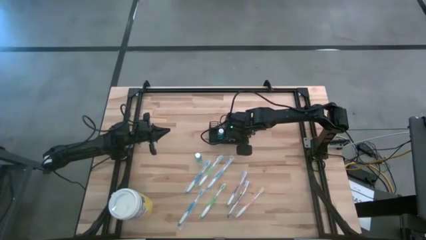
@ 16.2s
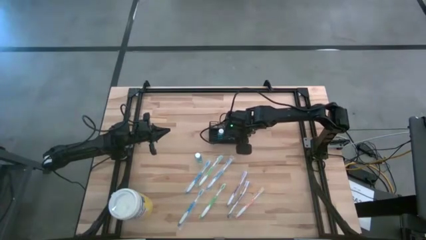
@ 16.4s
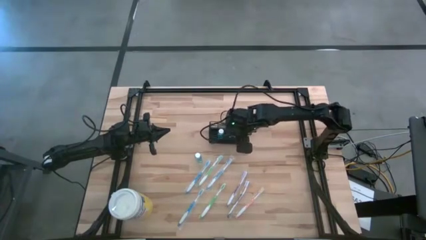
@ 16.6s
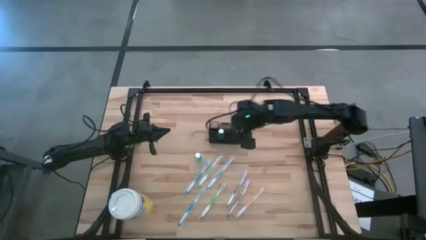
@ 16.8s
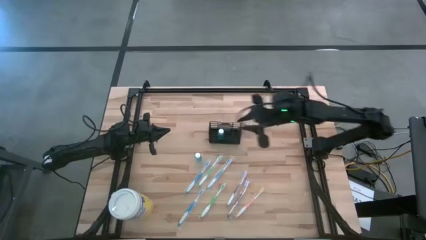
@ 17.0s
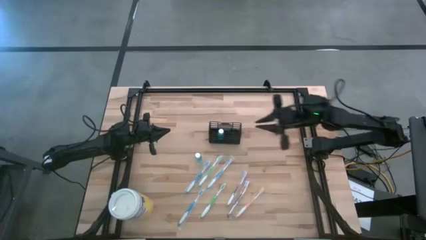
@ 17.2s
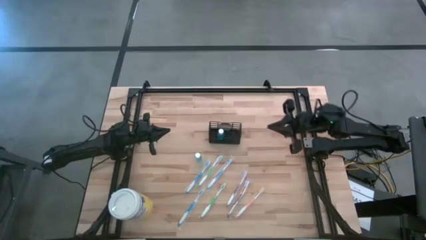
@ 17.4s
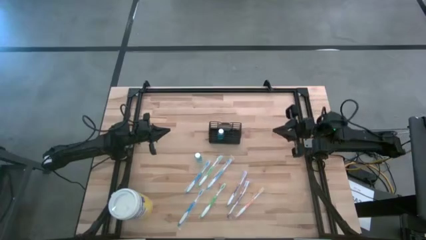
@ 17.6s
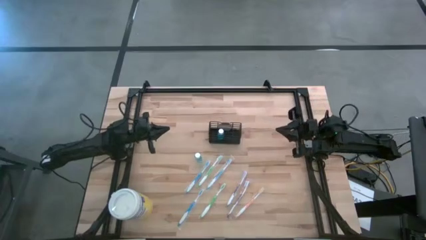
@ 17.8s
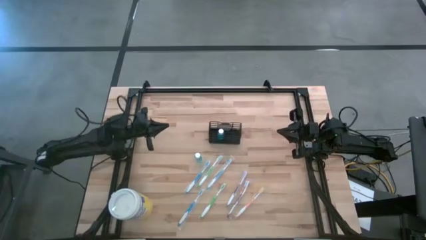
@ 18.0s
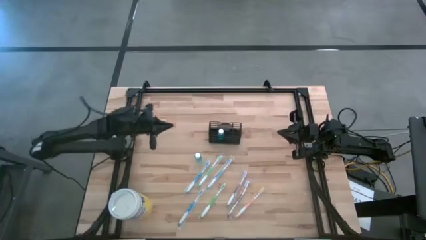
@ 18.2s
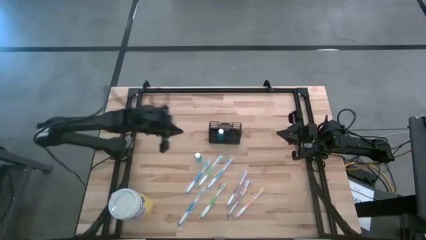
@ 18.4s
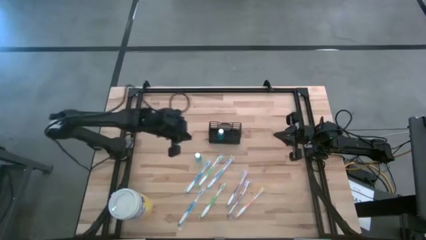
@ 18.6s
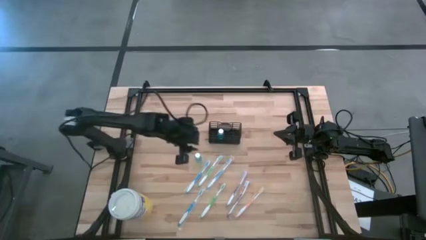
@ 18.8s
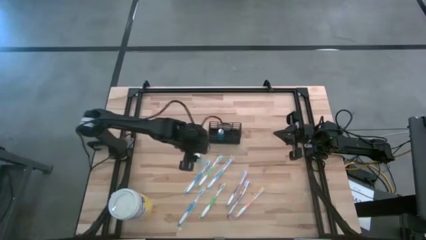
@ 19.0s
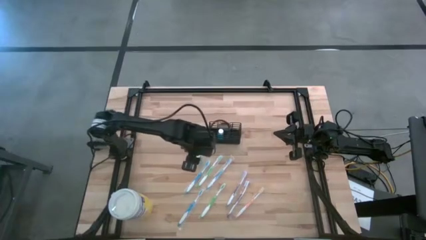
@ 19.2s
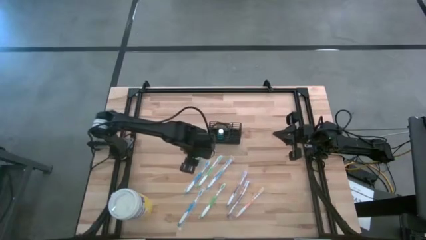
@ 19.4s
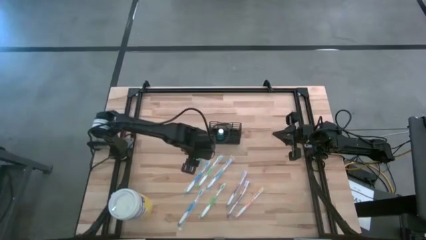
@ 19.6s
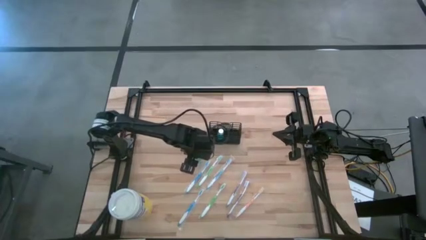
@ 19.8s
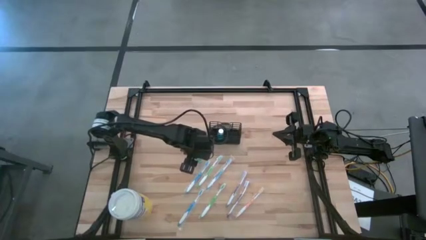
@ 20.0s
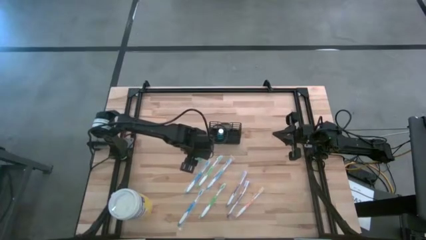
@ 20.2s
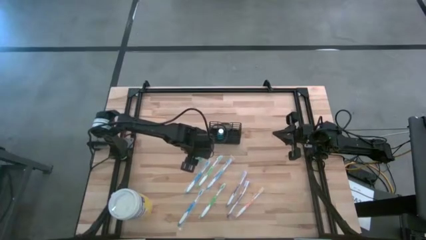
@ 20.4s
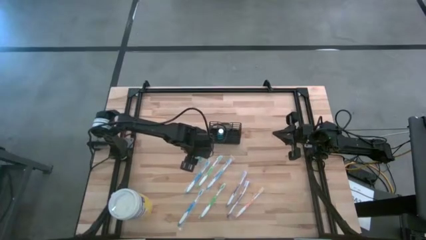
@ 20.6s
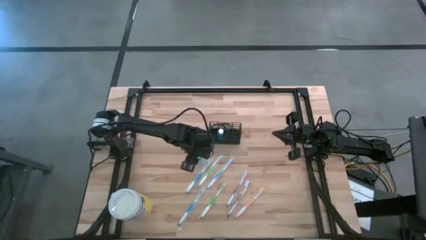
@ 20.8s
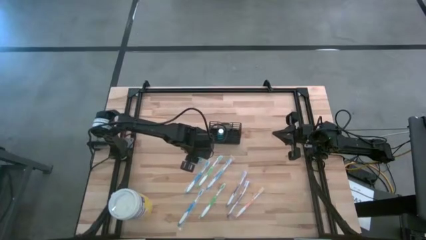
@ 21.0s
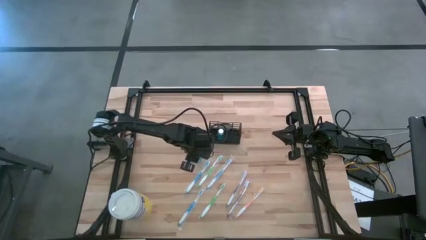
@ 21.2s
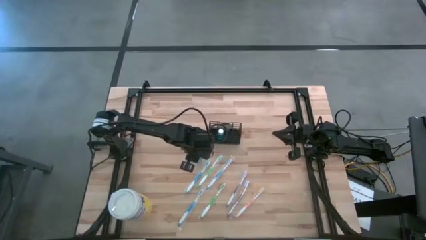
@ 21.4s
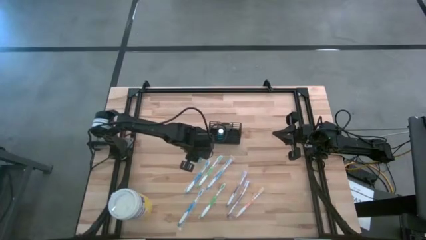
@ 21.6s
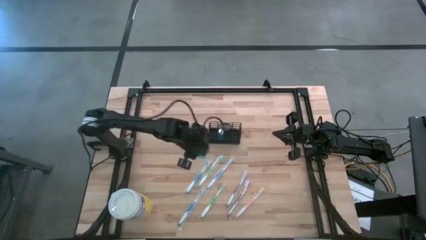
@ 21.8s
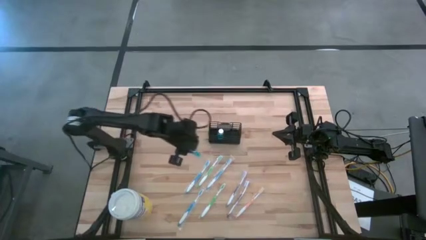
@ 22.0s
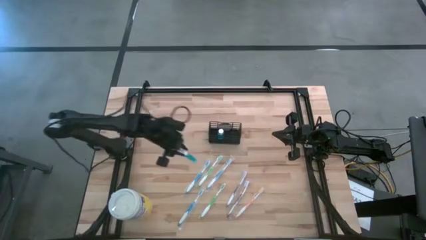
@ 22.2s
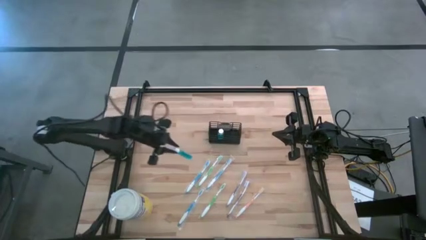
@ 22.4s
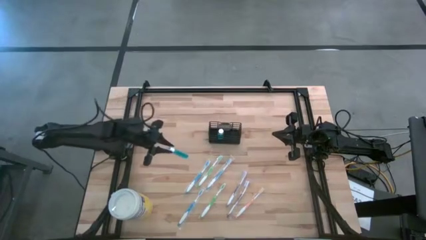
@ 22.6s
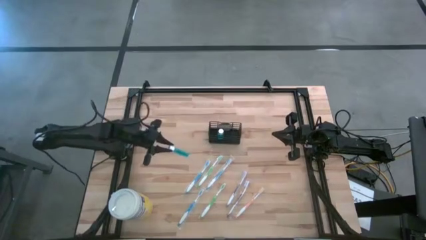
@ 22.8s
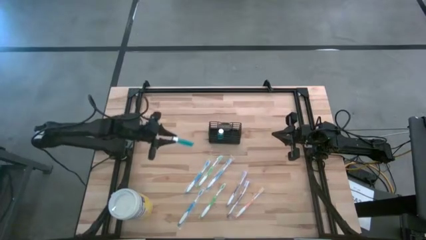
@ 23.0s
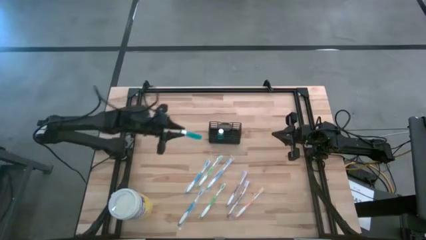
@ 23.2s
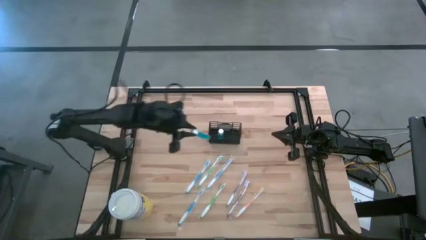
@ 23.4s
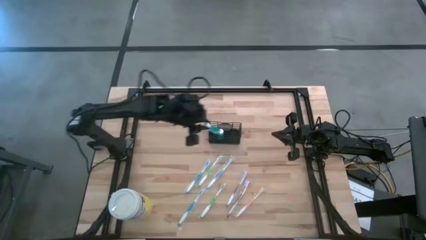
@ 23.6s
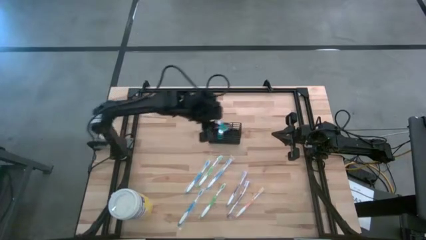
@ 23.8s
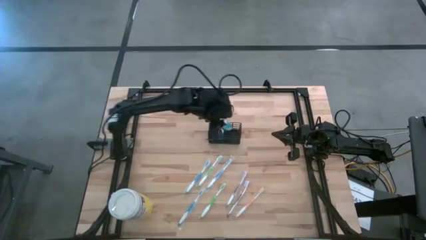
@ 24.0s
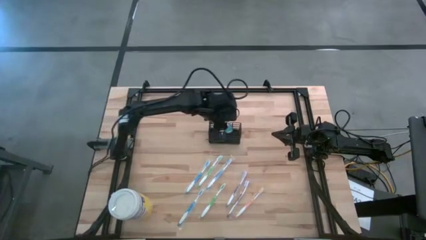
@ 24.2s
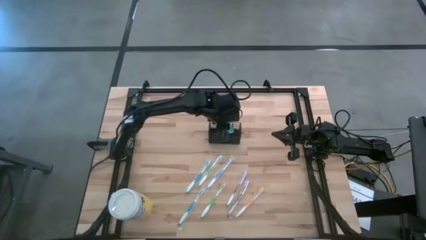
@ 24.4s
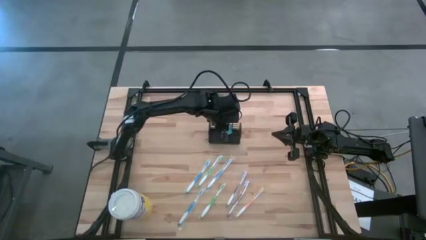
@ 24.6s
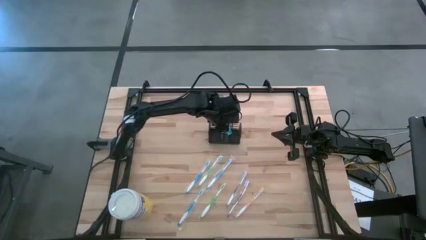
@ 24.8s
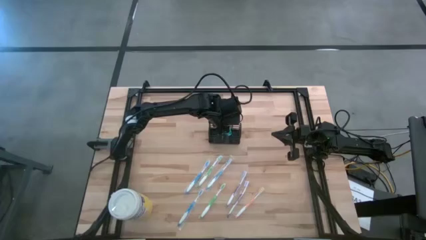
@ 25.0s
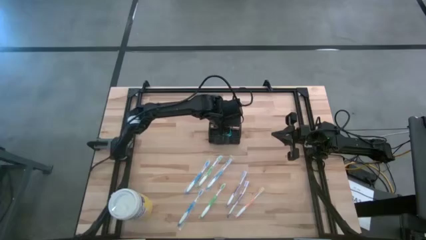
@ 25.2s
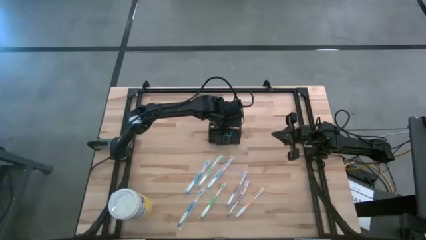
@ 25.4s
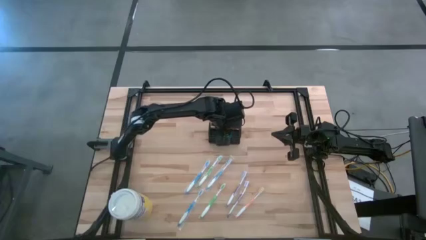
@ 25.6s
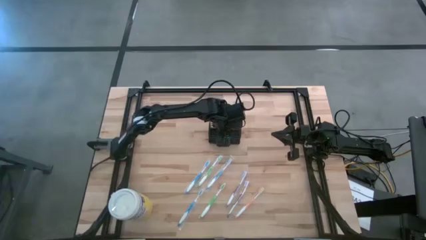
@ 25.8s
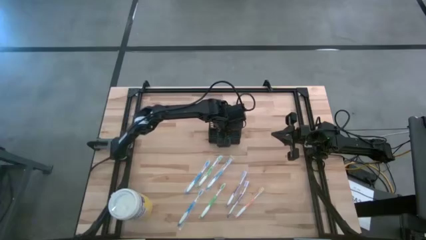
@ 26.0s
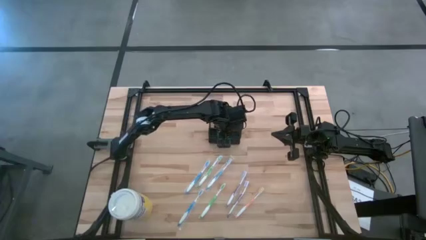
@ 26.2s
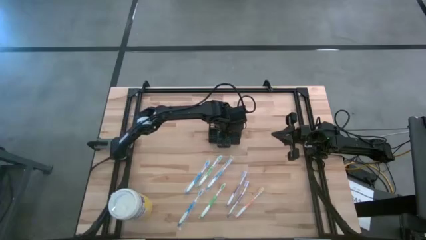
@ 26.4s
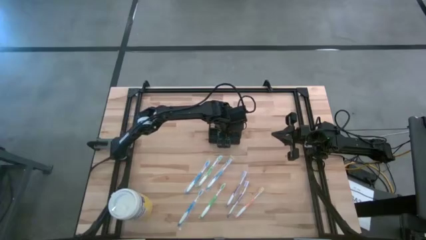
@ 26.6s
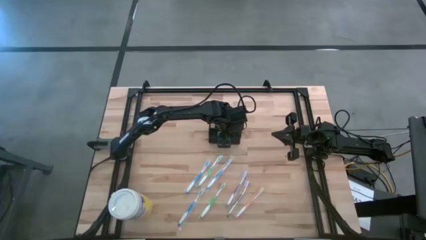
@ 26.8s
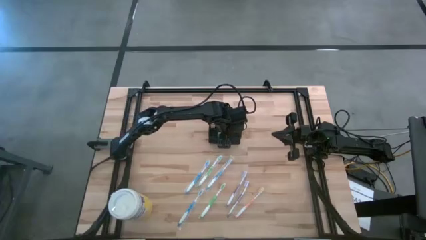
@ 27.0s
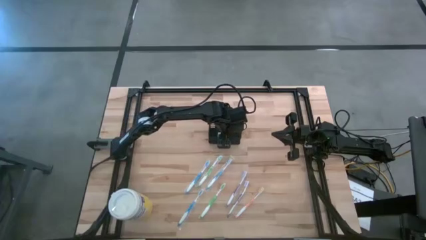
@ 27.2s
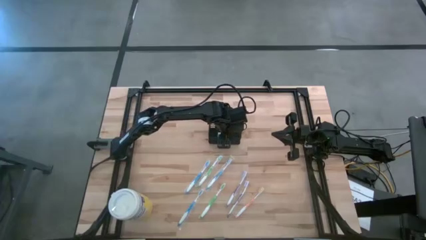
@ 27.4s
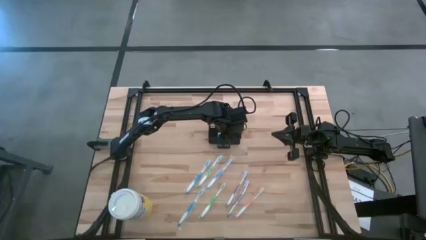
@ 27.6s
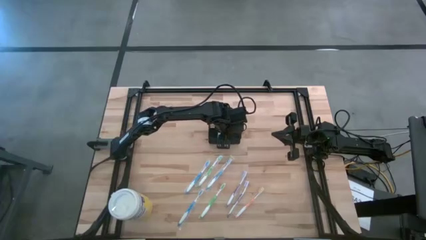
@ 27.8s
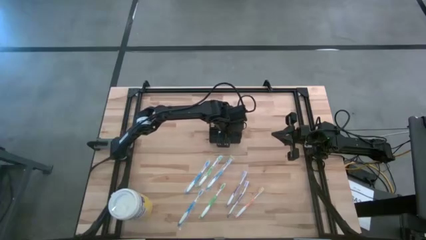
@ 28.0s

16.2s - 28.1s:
Task: Pick & Place toothbrushing station
Put the blue mouthwash bottle into the wire organizer
